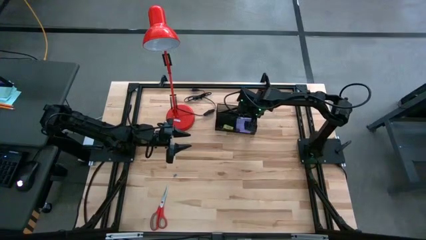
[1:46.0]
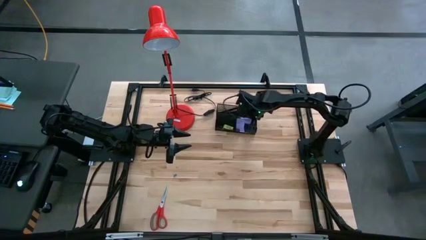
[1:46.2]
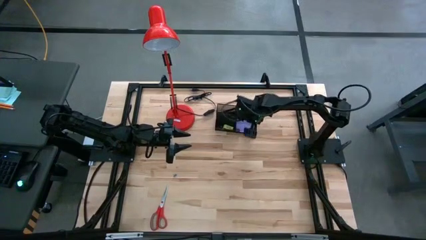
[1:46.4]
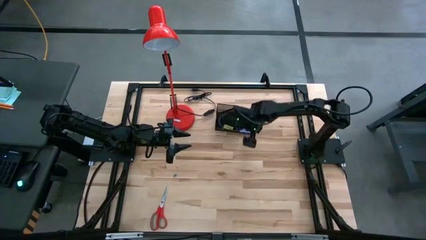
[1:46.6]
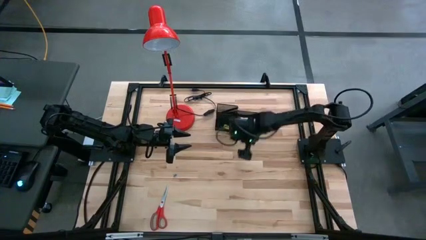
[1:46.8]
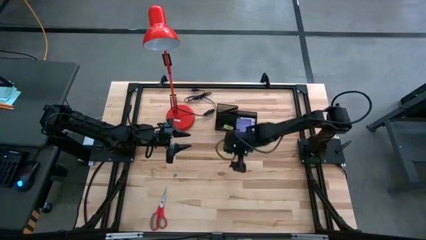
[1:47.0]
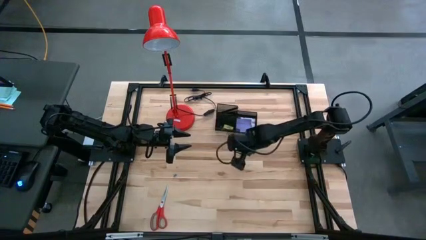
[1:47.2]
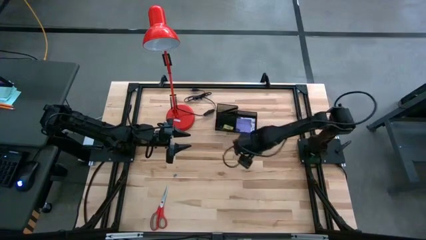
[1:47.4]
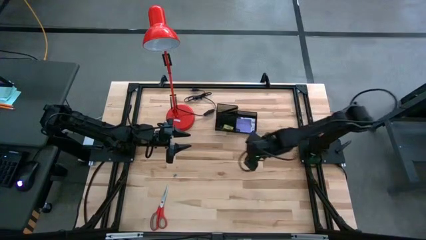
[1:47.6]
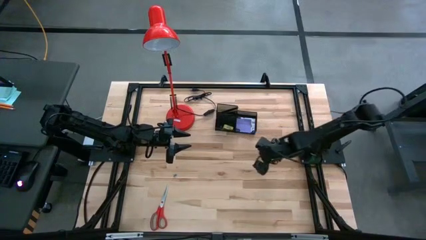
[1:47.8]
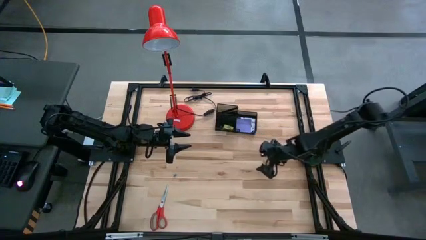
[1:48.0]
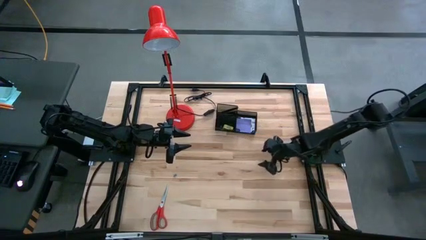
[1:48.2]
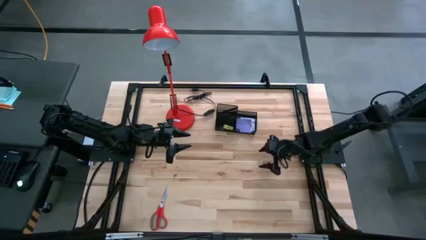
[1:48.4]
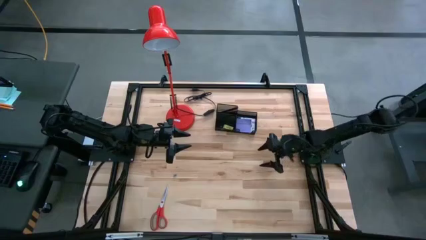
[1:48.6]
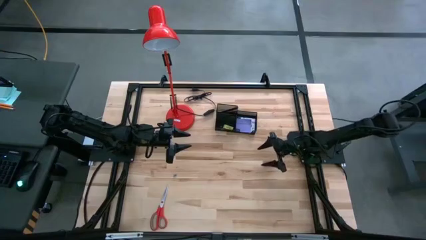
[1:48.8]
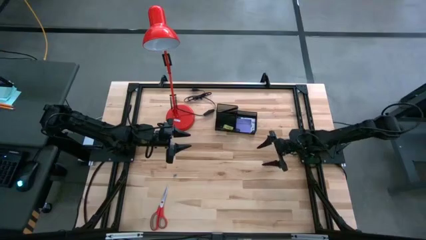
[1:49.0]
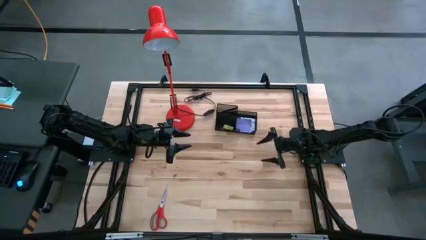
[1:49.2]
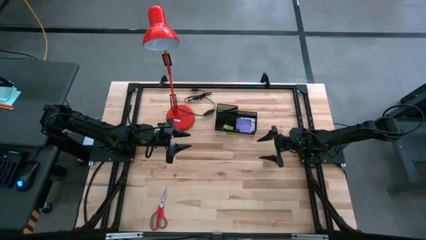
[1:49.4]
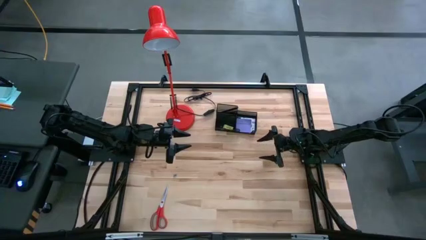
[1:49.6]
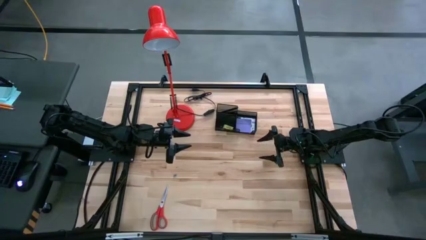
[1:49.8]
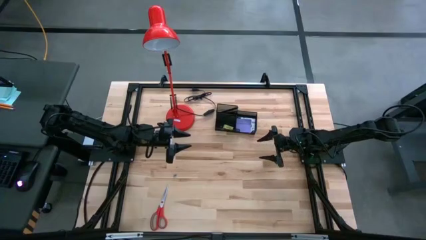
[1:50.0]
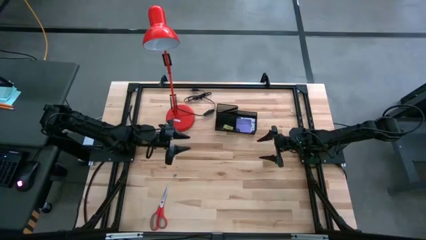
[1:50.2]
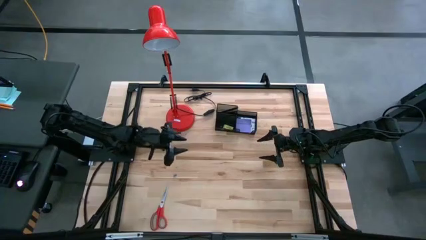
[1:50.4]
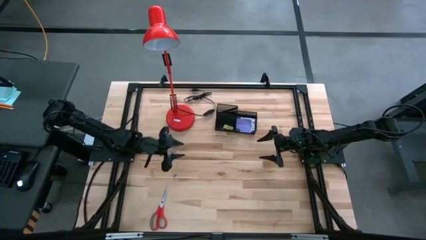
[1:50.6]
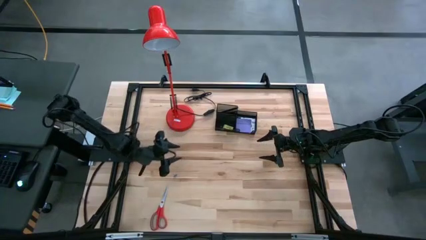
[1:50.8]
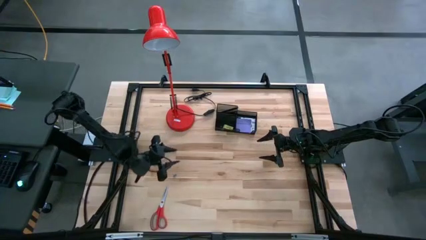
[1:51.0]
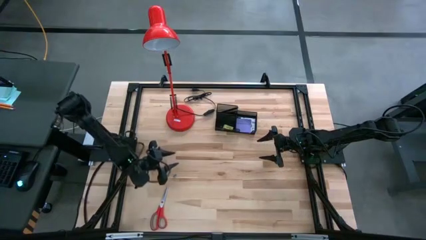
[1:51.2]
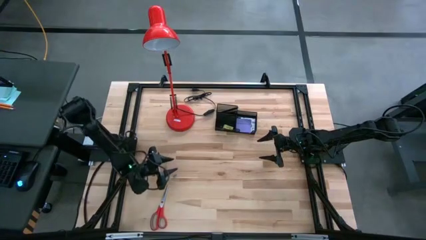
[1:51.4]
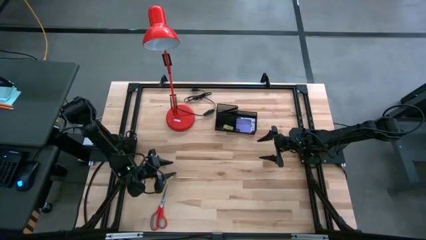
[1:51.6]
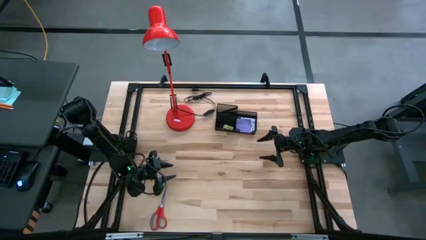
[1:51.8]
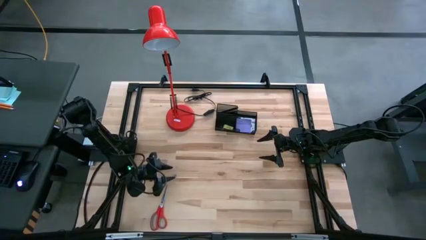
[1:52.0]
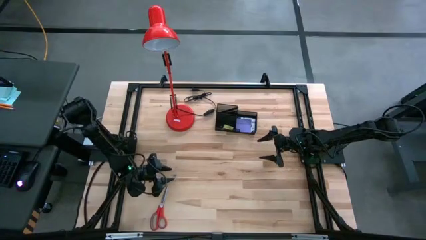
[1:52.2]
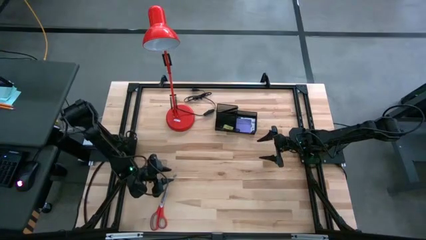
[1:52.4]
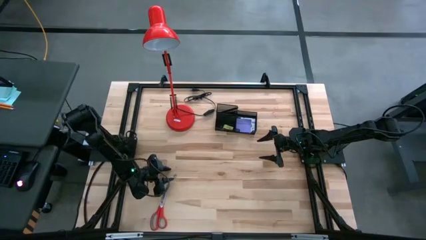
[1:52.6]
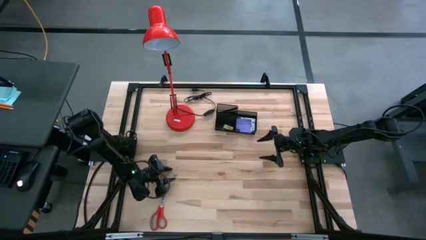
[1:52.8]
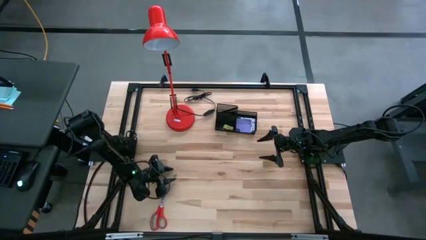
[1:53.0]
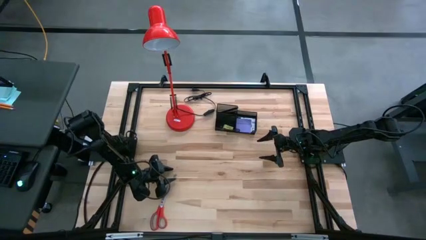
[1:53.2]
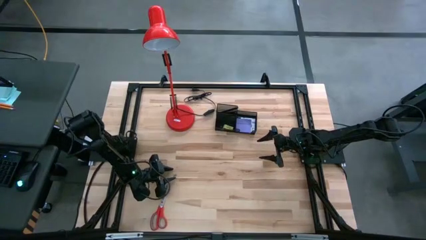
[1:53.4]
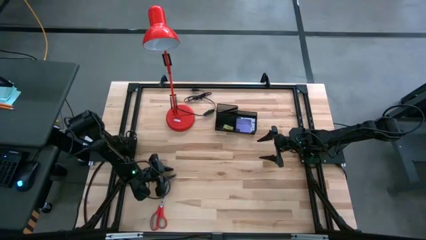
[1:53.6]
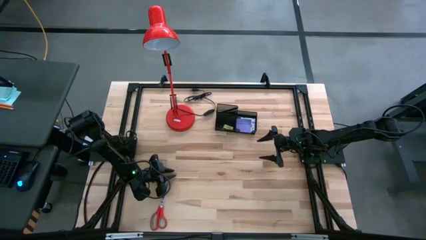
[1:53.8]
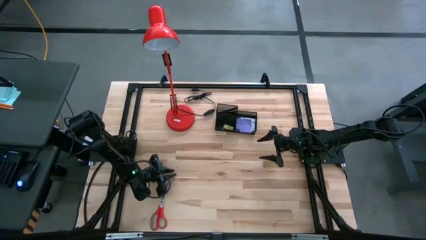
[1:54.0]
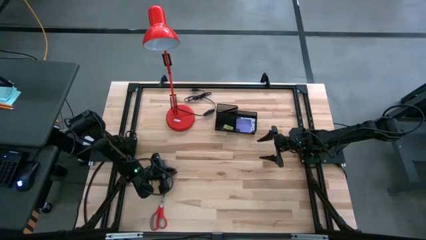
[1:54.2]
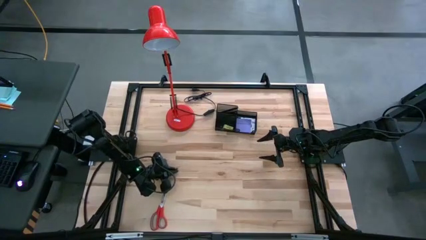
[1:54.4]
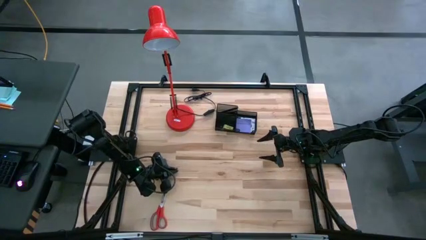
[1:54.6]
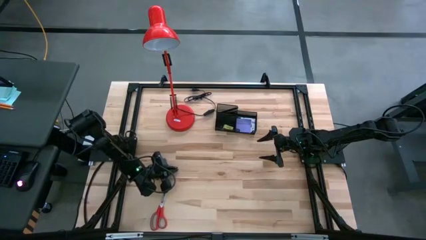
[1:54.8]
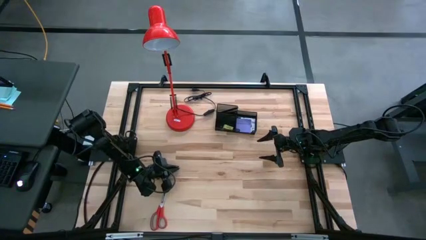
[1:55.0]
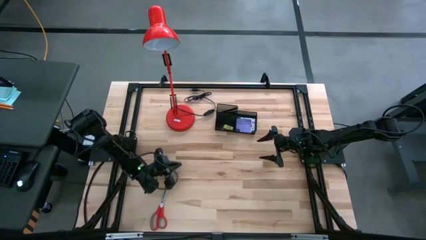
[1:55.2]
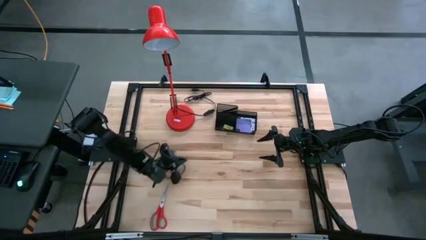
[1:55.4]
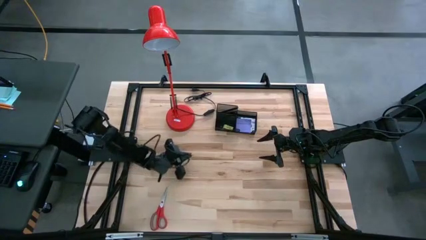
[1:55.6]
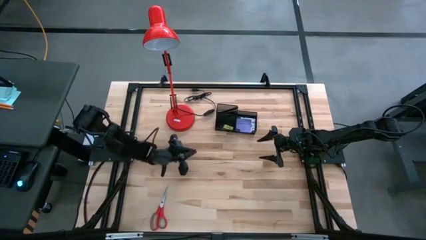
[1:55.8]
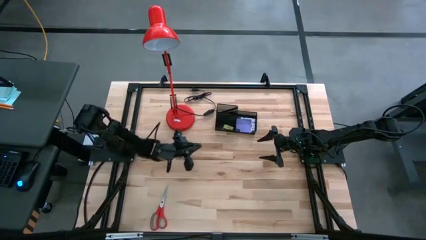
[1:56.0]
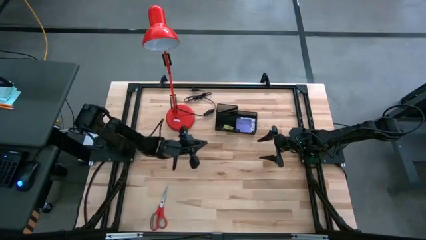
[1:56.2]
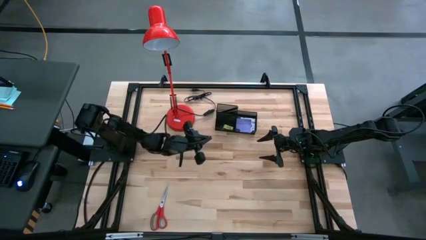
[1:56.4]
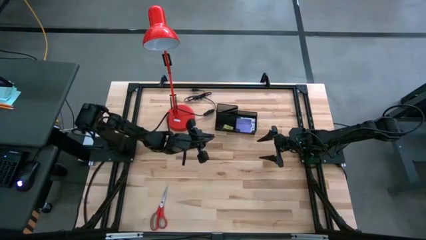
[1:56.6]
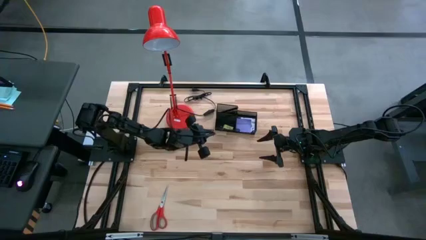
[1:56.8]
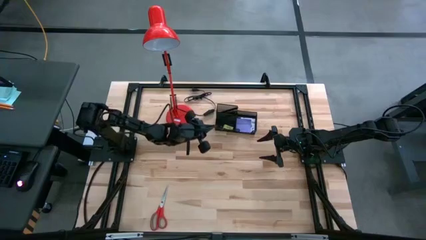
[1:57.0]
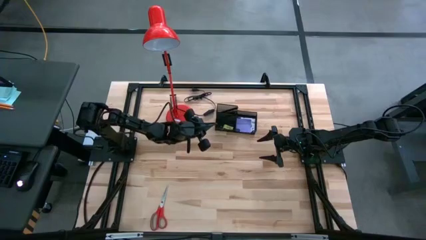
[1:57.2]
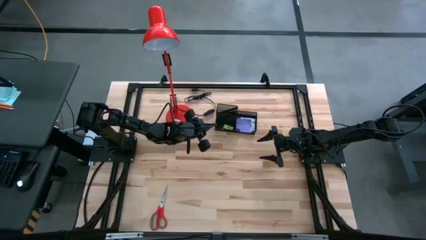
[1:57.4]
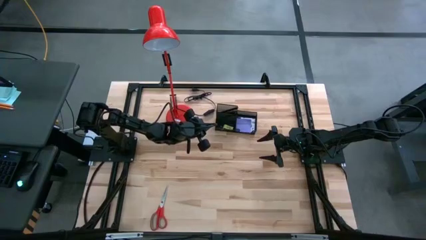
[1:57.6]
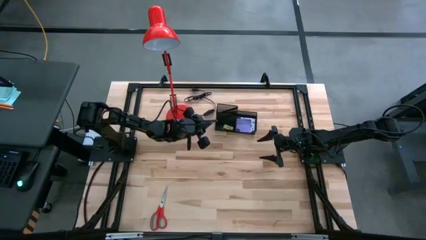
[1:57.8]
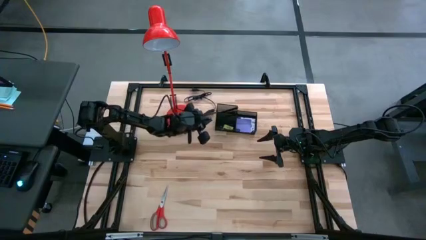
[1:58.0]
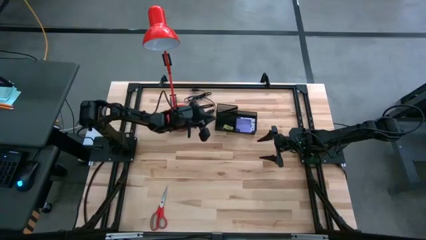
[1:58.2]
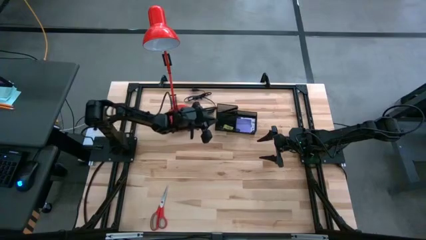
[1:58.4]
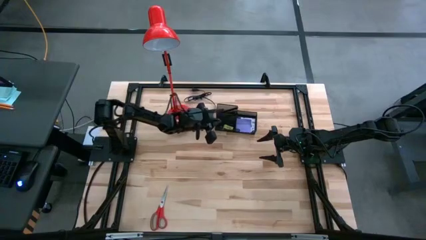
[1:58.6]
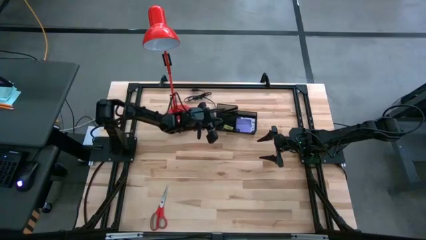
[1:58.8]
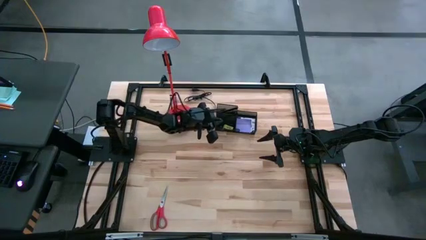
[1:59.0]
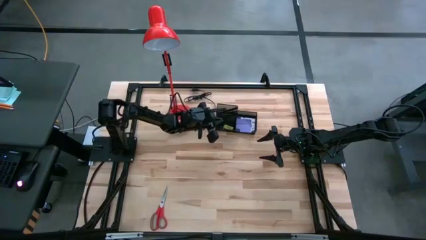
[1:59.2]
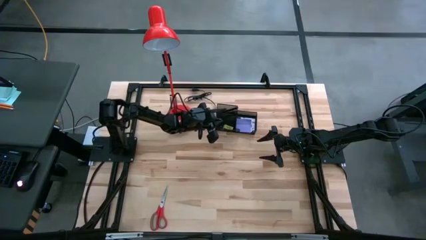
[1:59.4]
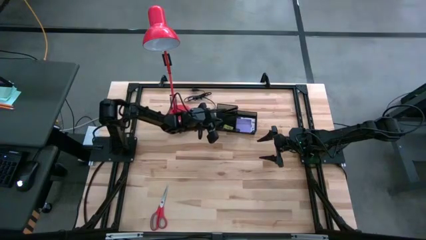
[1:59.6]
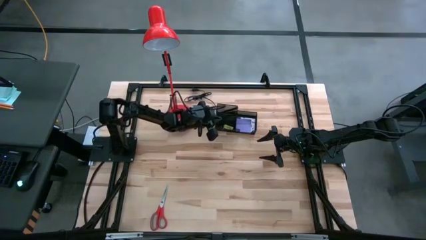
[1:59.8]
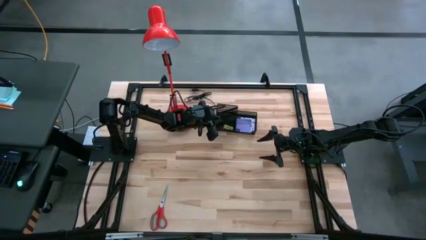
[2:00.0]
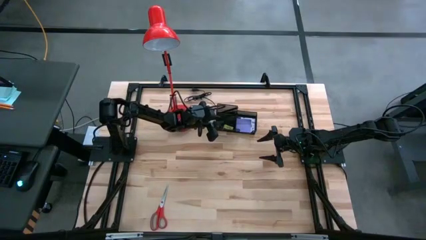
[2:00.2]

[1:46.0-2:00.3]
Task: Pick and place office supplies into organizer
Put the blue binder clip into the black desk organizer
